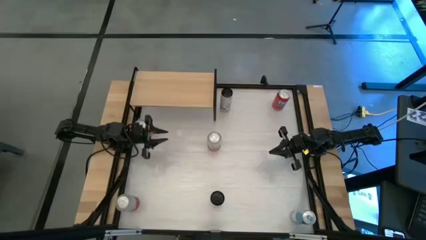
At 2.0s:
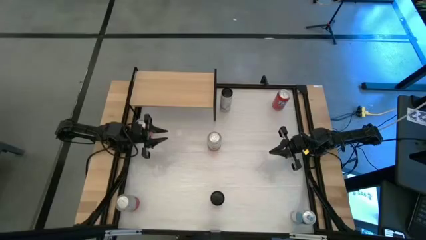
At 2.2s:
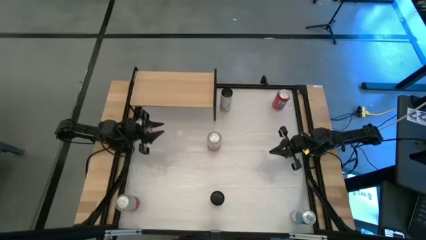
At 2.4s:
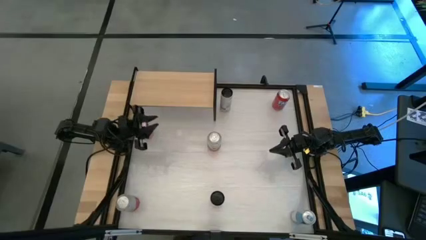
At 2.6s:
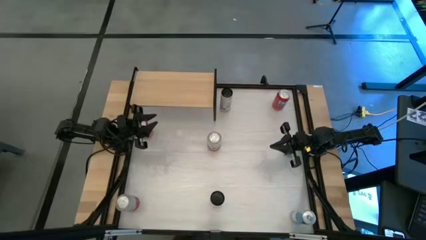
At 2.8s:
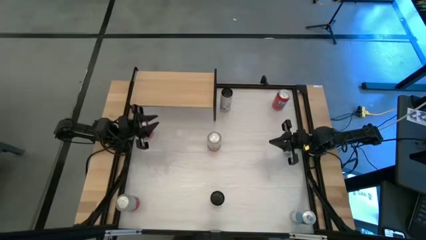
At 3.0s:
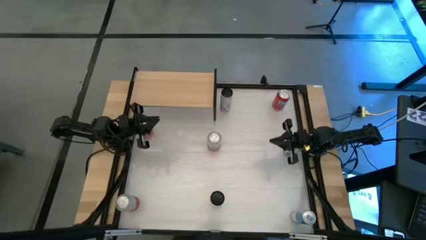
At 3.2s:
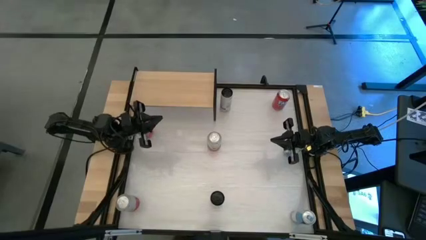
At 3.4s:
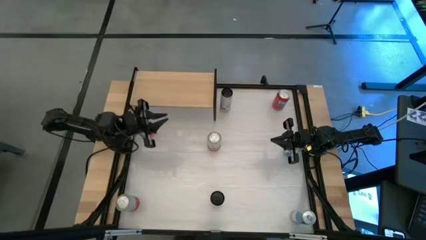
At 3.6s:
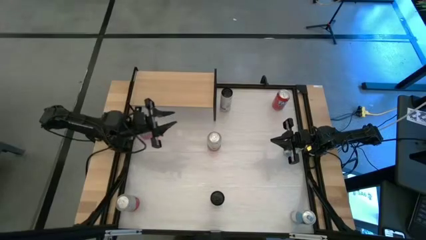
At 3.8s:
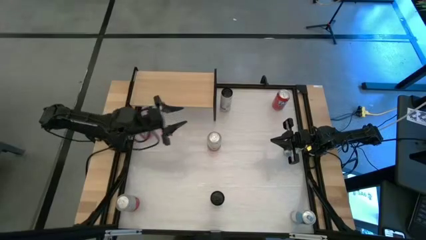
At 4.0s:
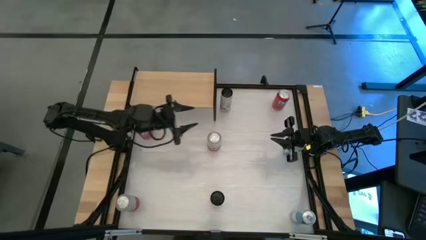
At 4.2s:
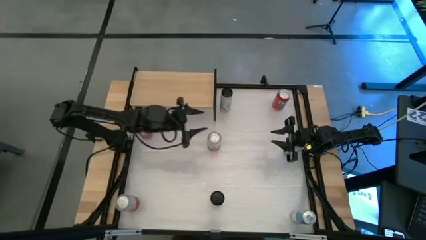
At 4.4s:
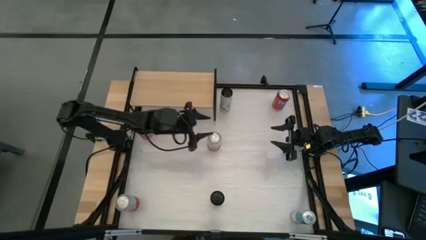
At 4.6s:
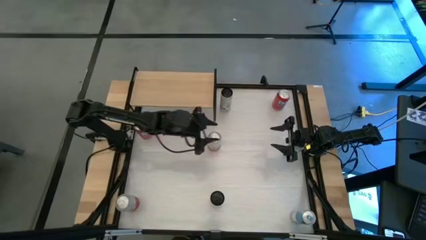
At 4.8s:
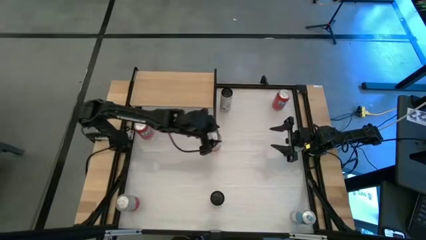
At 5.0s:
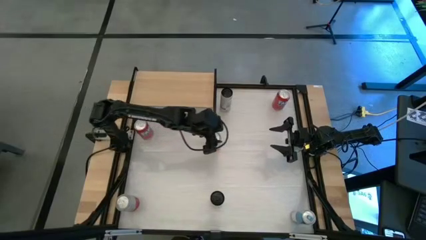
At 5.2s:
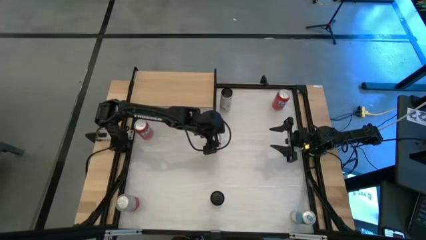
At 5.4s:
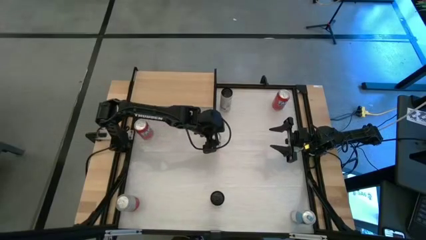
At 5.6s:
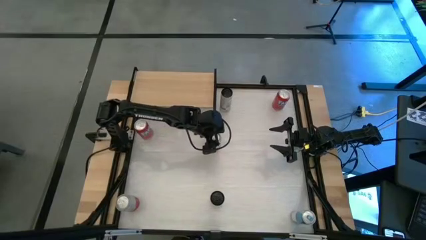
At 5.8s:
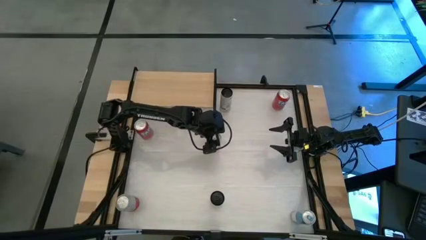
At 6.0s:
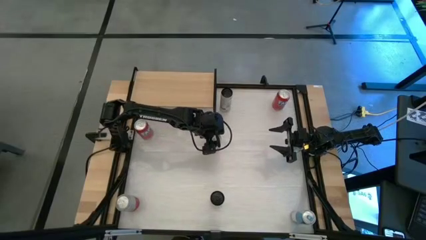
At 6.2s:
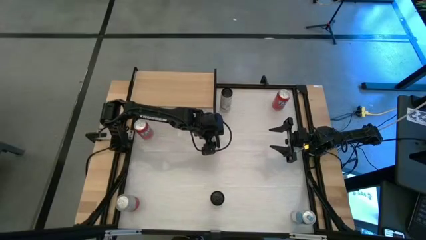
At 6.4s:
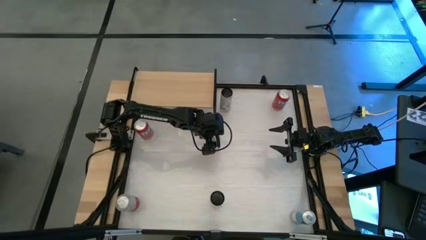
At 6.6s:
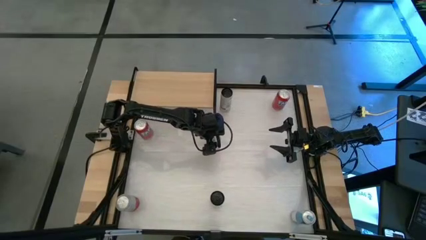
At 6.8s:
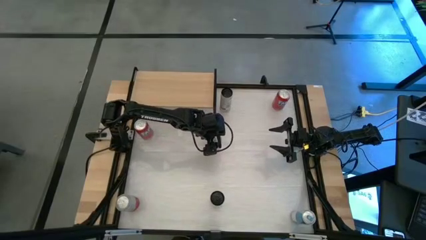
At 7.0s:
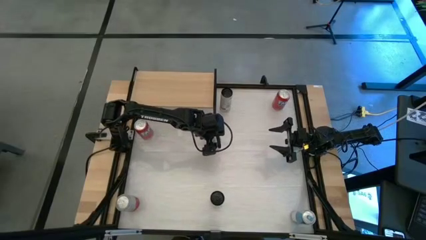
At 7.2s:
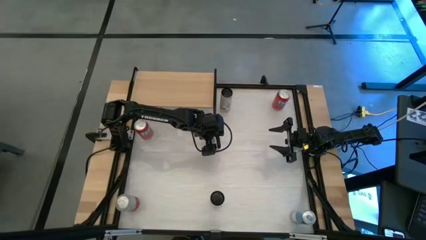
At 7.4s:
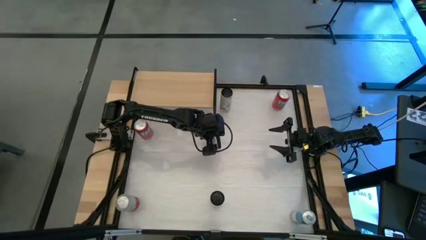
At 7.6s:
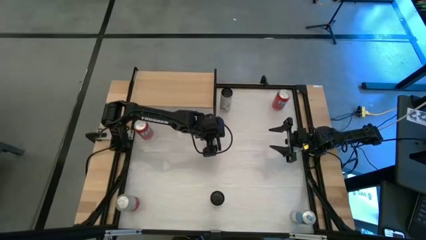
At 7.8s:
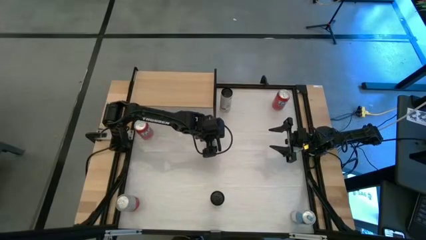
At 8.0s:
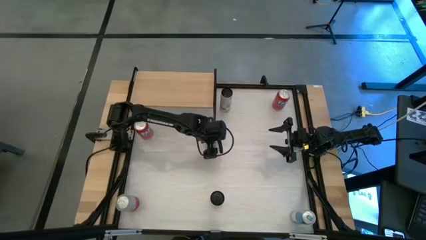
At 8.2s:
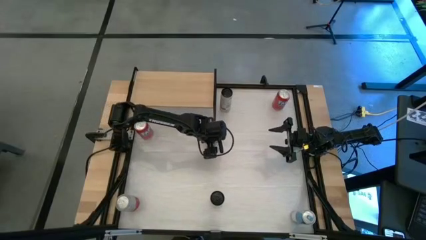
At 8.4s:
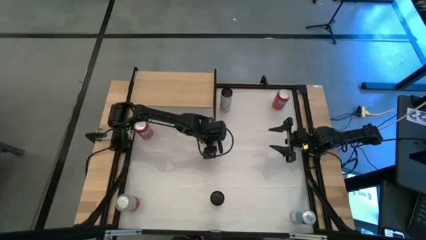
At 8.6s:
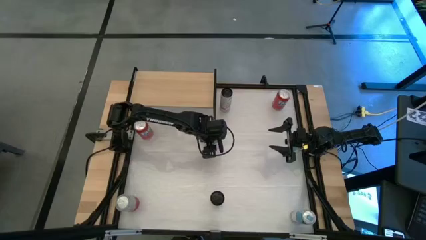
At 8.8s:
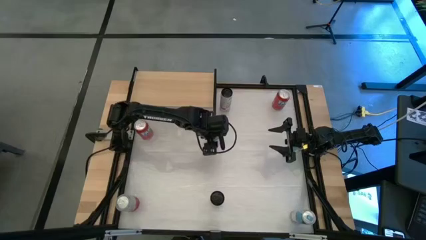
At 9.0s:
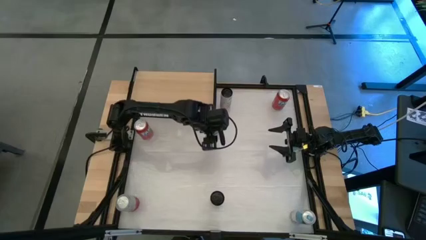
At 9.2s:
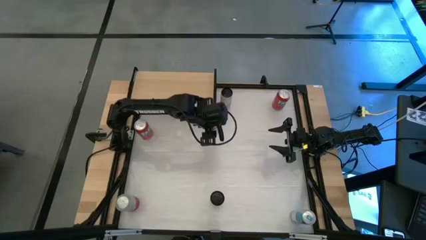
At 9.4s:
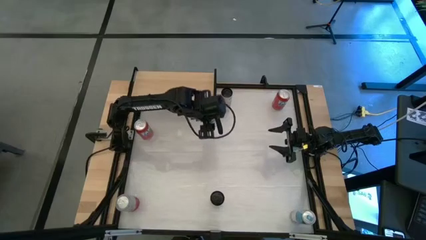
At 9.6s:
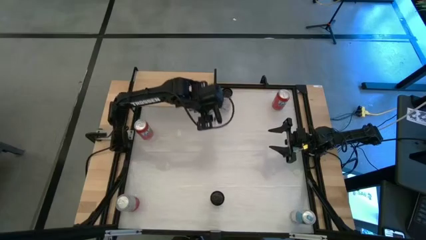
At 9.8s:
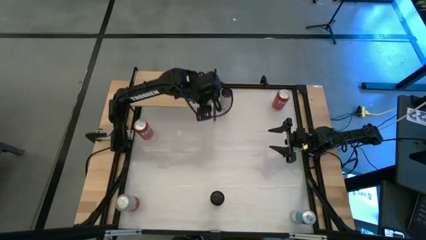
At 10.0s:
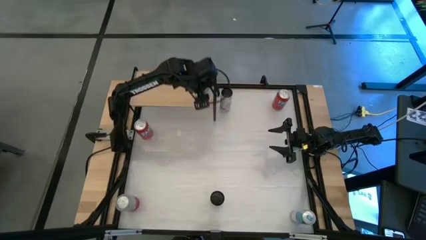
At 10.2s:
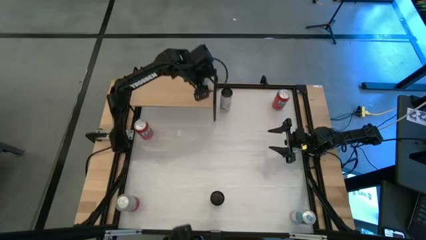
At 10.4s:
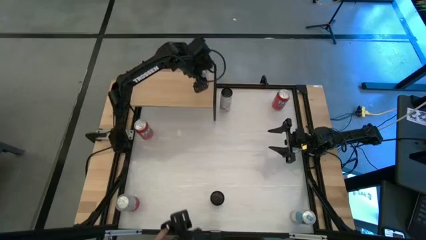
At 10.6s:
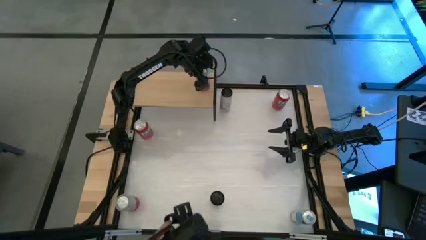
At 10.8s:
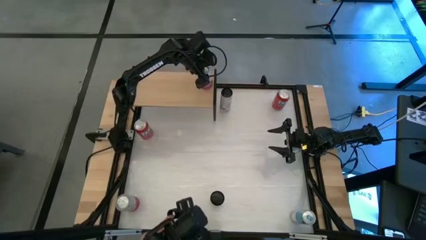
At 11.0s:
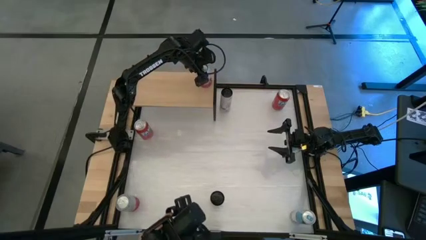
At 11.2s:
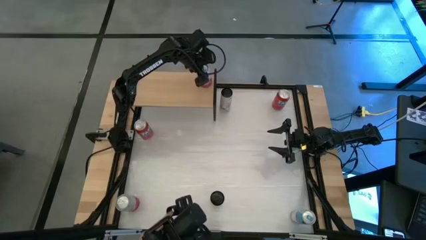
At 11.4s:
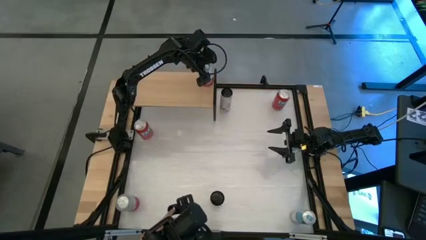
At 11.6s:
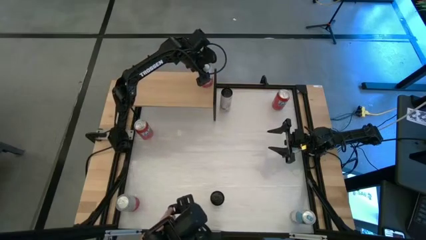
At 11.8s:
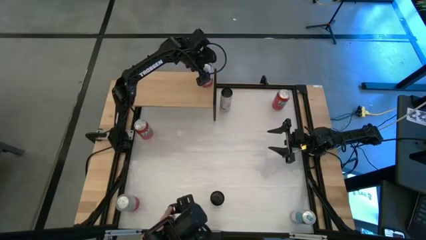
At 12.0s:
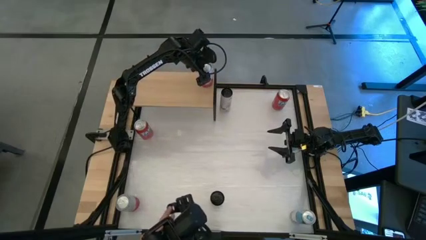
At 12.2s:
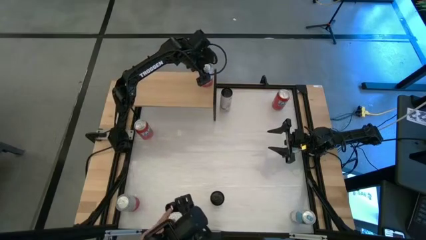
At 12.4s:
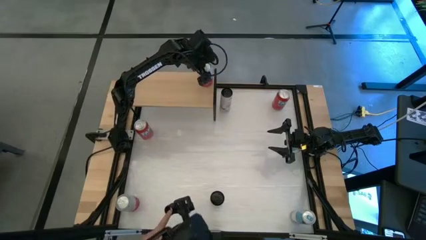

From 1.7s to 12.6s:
Task: Place canned beverage on shelf
Put the top pink soda can on the shelf

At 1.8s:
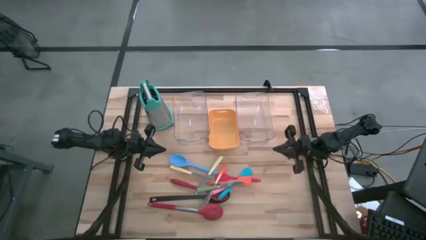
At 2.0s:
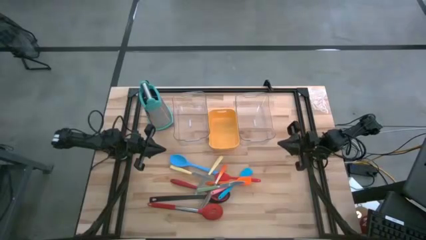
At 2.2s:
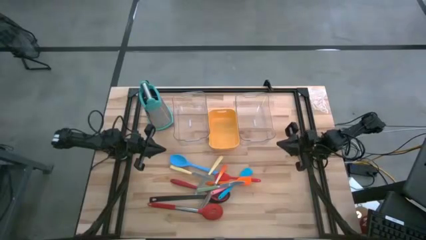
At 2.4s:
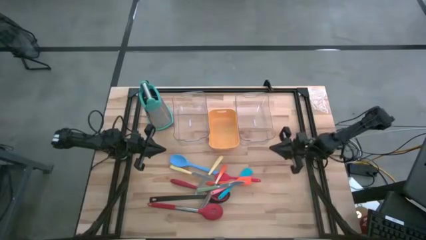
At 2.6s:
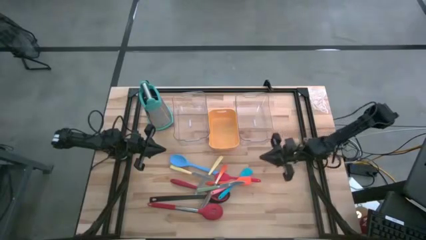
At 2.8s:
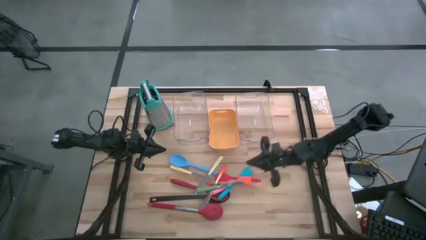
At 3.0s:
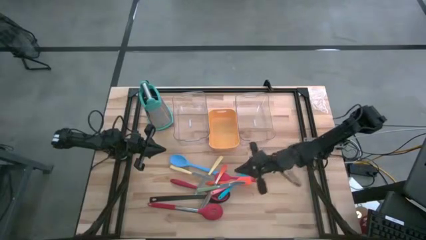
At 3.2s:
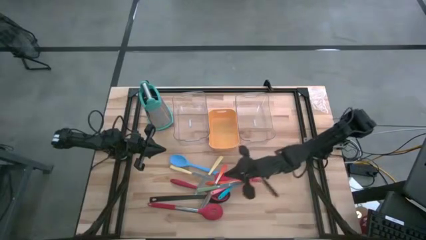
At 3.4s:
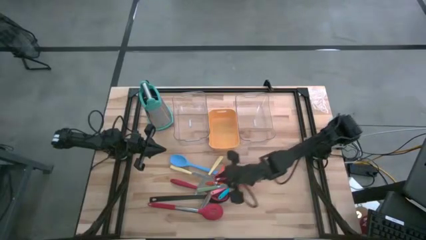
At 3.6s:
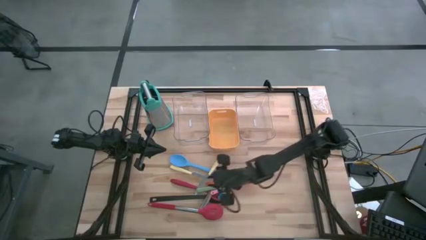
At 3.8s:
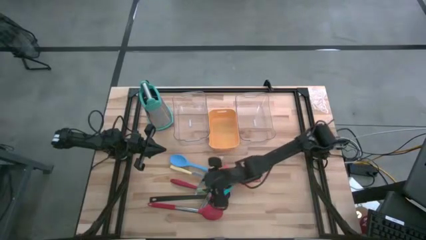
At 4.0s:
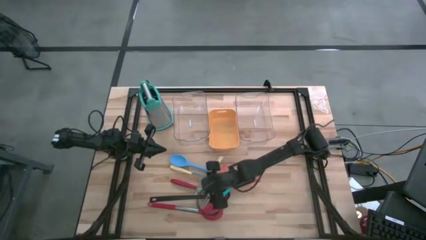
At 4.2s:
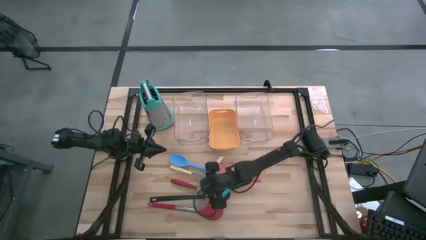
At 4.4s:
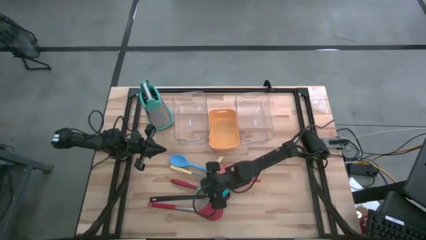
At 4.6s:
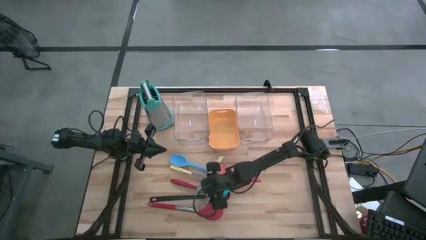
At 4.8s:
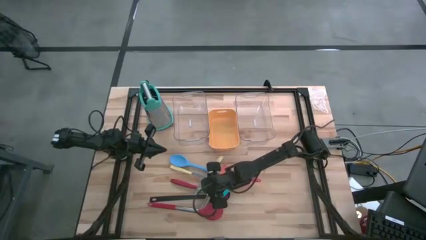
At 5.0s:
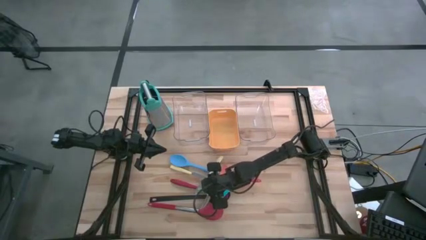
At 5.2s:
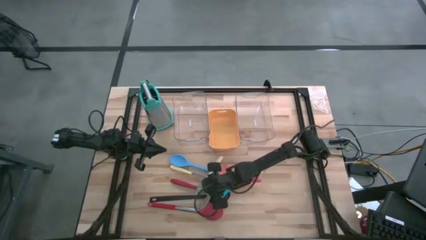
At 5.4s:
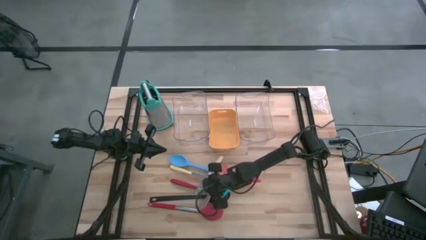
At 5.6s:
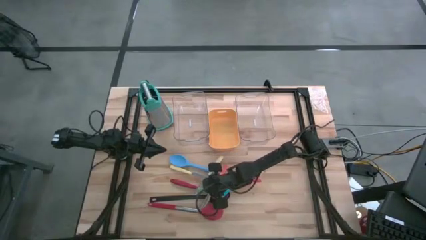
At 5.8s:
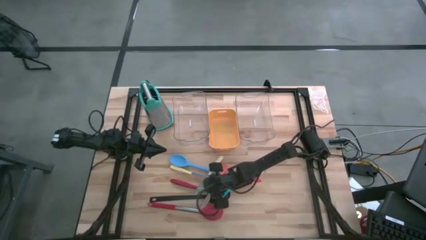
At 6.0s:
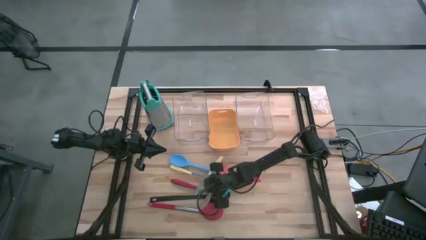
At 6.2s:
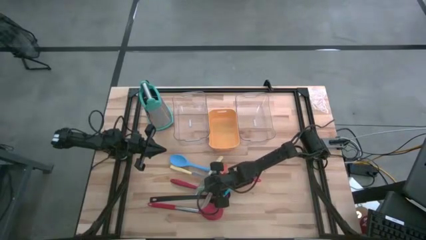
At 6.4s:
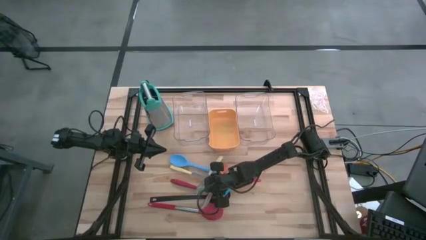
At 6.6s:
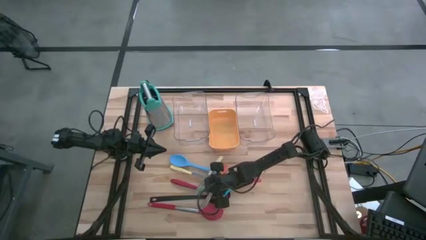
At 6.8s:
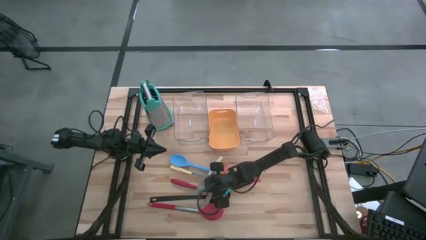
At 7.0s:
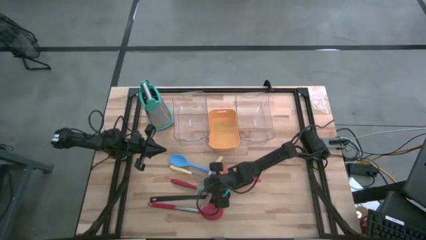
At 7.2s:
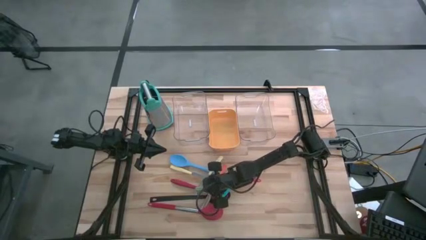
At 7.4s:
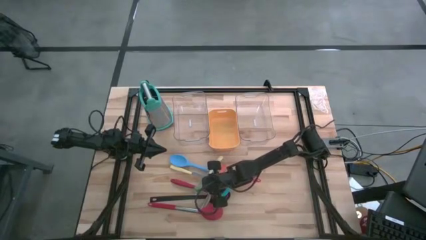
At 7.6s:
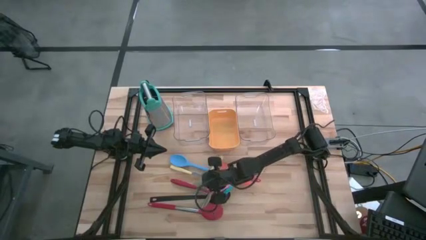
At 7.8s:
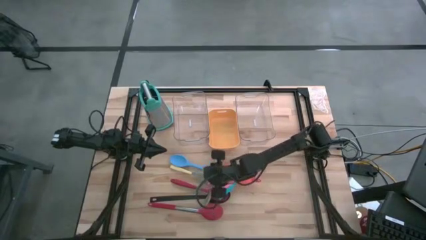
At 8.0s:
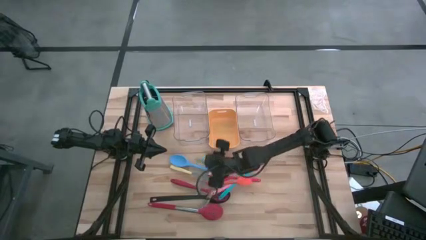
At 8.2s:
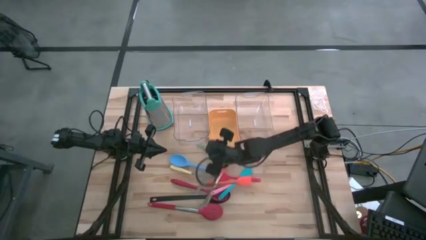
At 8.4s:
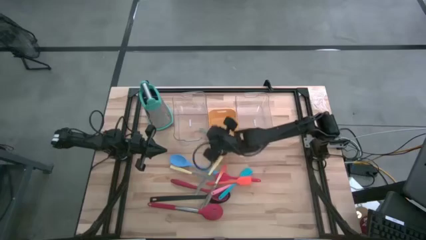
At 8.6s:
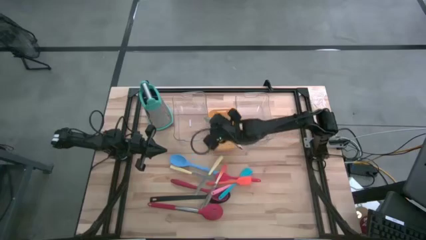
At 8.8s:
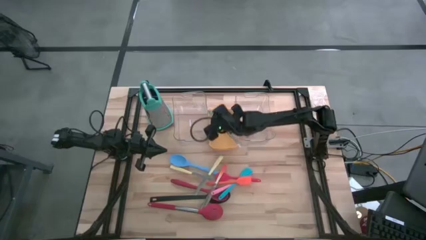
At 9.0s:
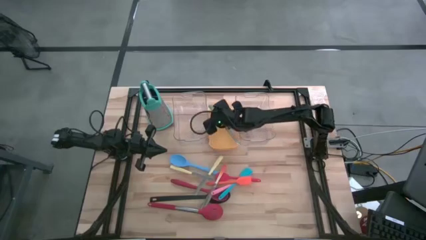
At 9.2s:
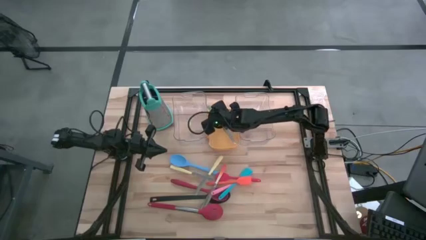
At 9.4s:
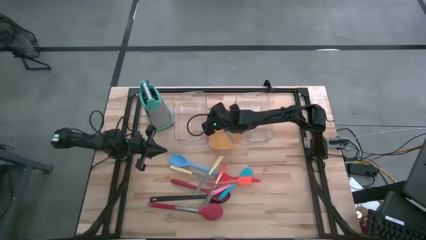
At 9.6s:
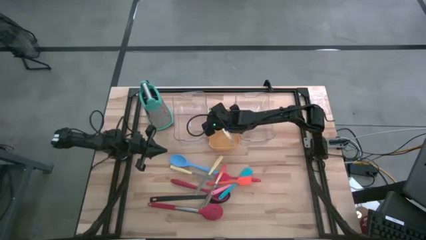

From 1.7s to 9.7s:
Task: Pick & Place Kitchen Items
Put the green table knife into the orange bin
